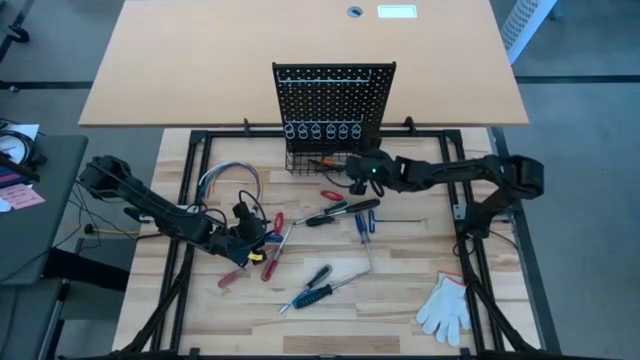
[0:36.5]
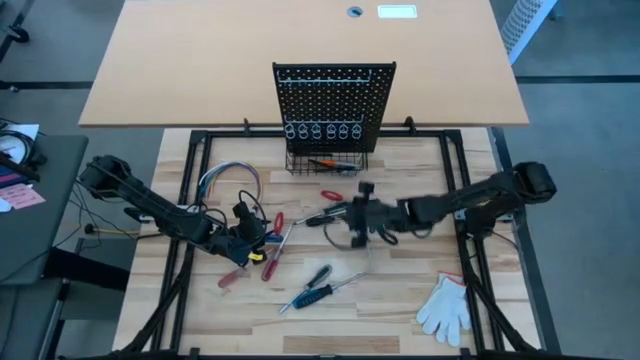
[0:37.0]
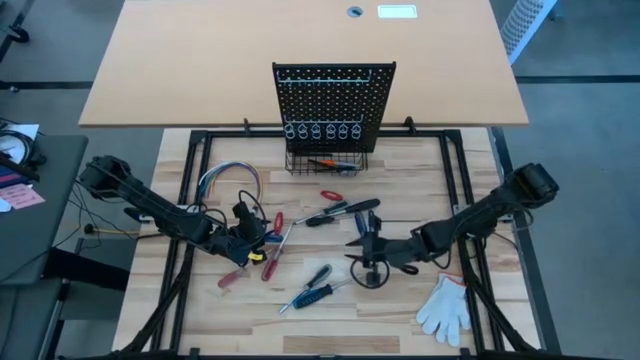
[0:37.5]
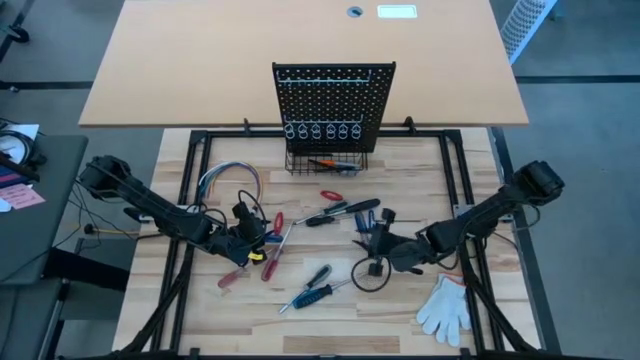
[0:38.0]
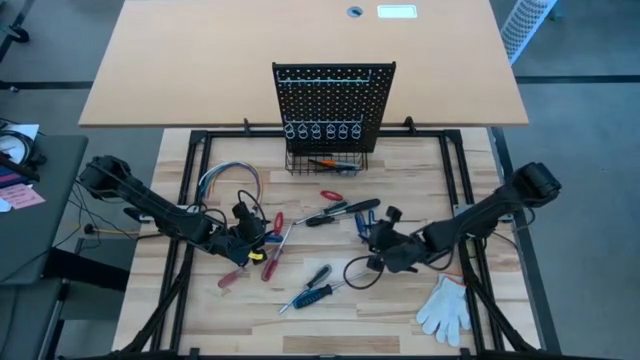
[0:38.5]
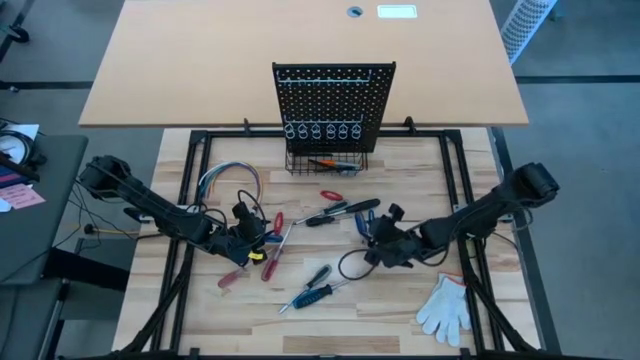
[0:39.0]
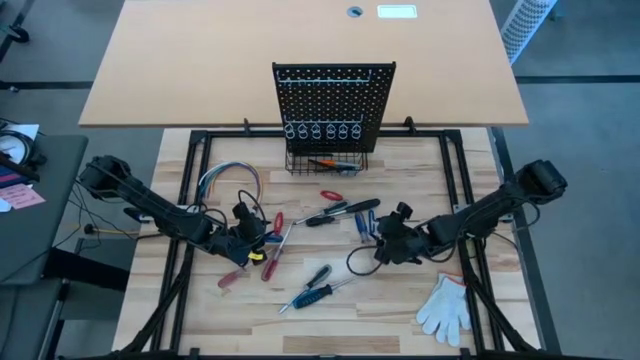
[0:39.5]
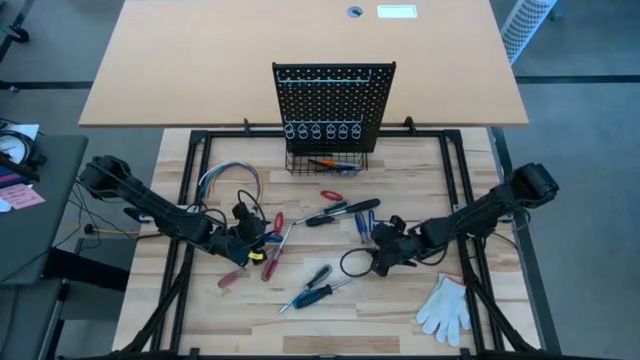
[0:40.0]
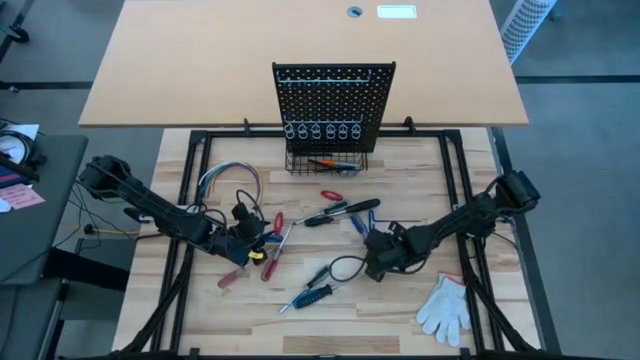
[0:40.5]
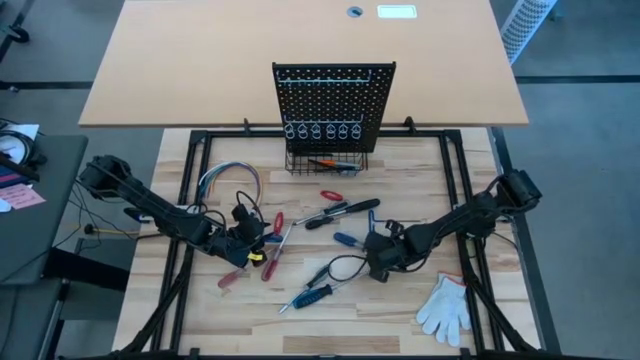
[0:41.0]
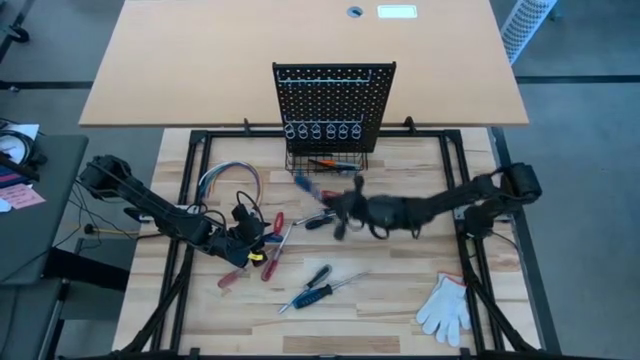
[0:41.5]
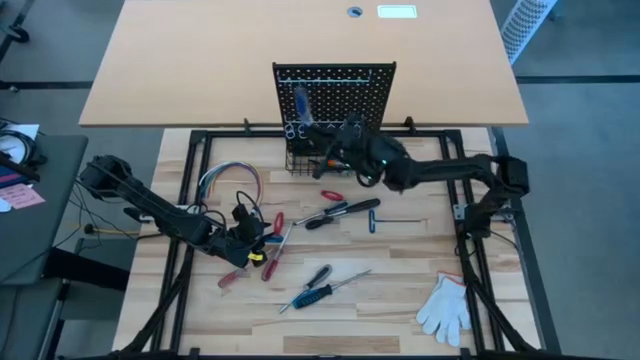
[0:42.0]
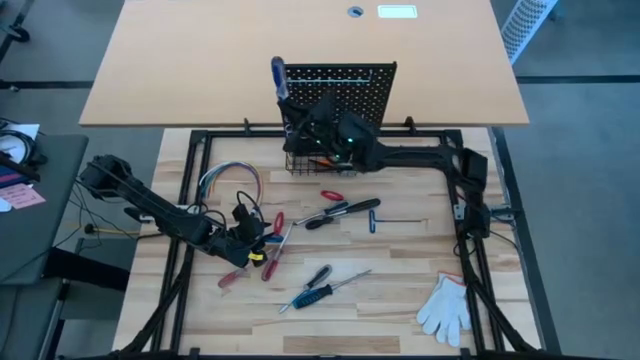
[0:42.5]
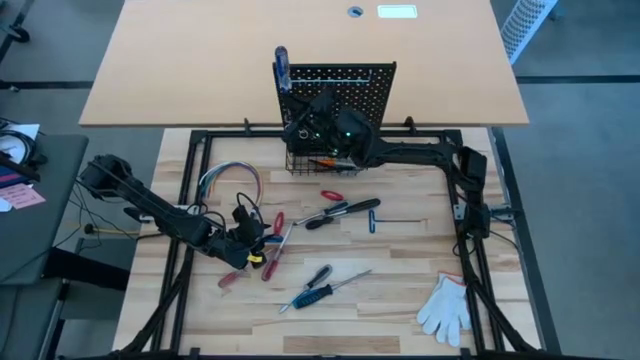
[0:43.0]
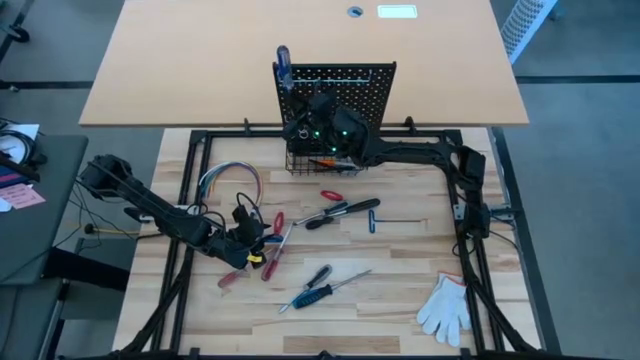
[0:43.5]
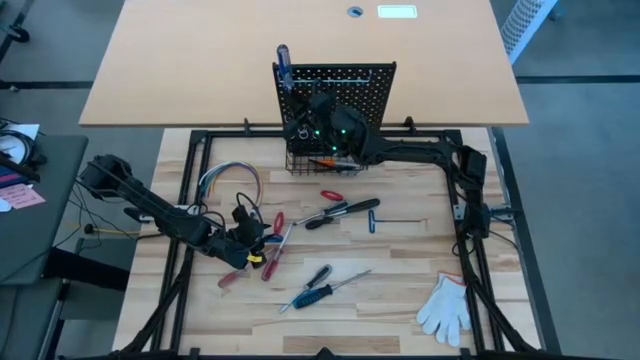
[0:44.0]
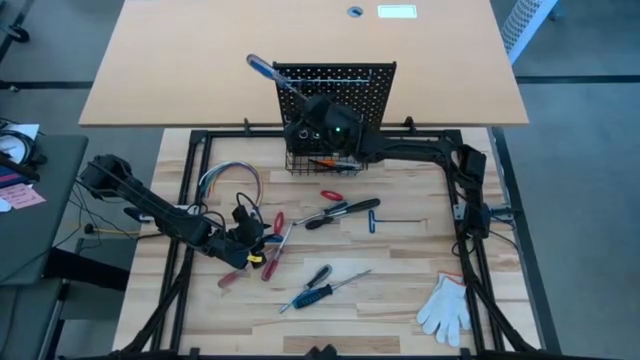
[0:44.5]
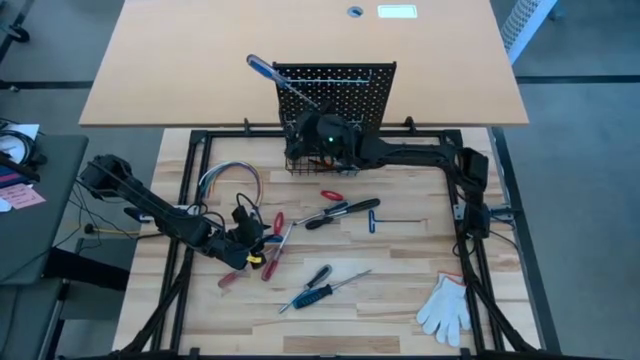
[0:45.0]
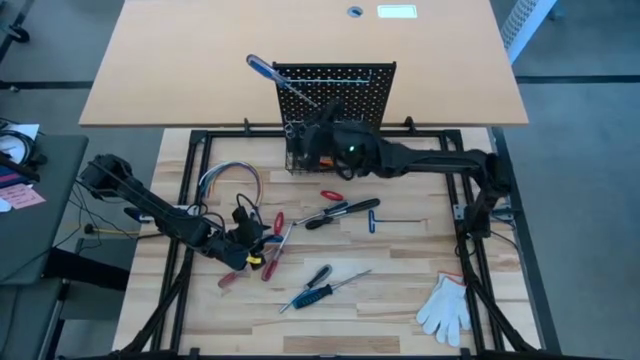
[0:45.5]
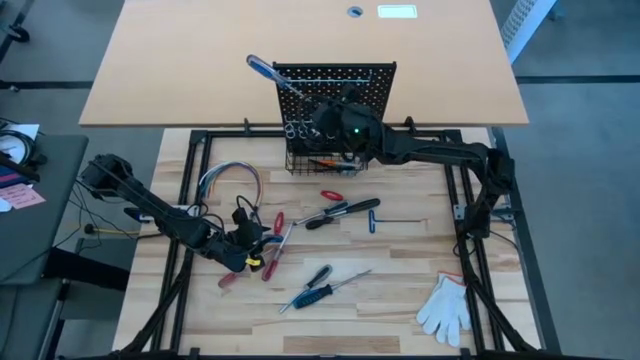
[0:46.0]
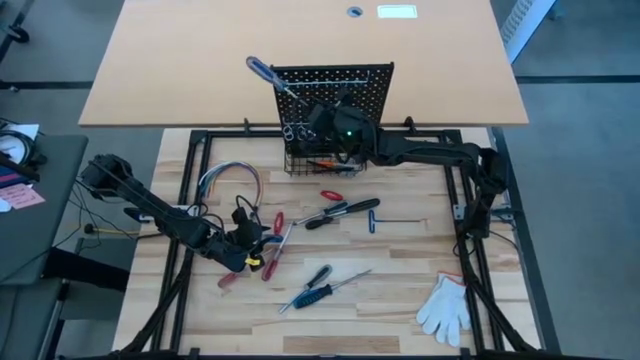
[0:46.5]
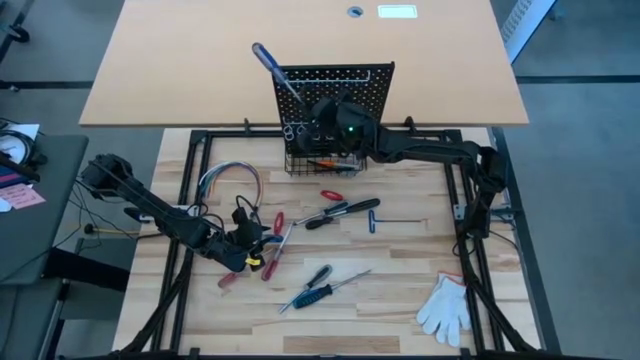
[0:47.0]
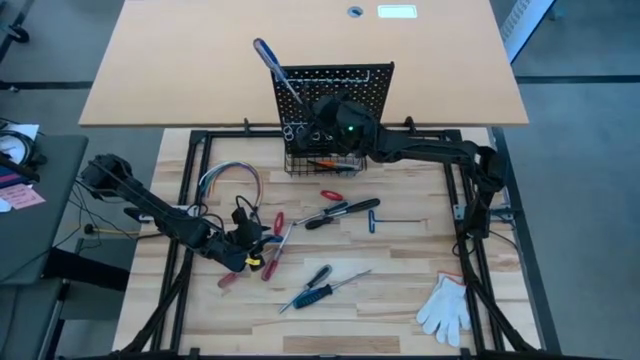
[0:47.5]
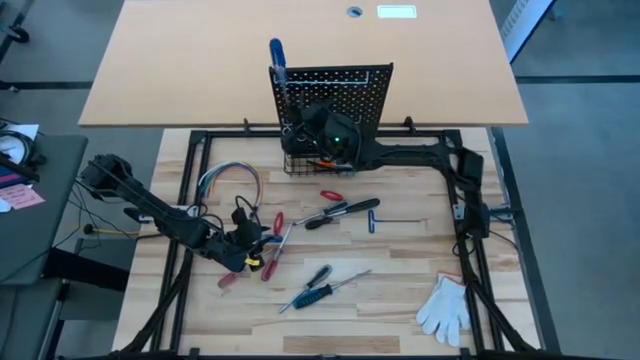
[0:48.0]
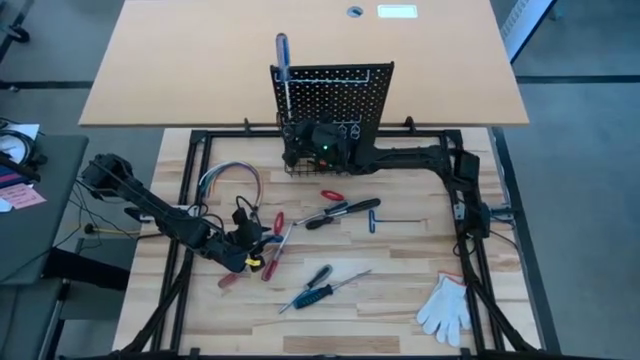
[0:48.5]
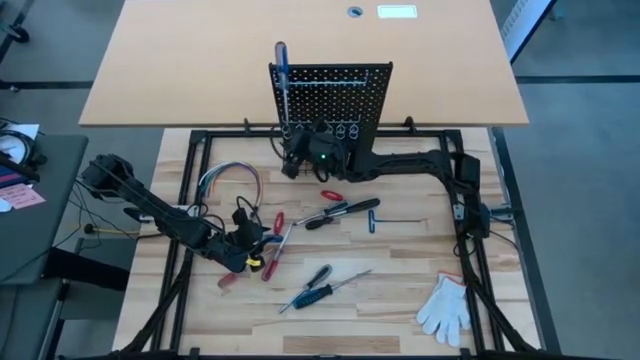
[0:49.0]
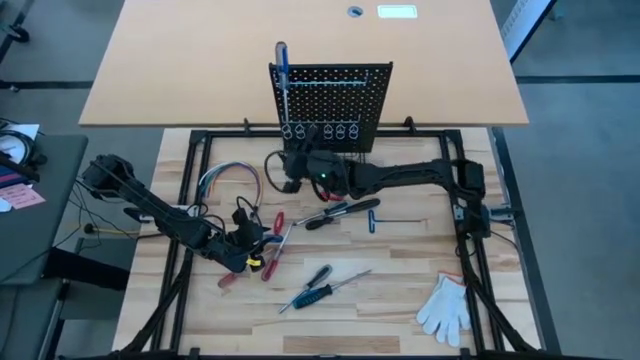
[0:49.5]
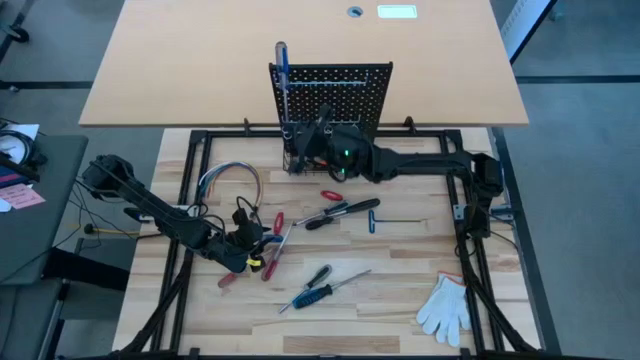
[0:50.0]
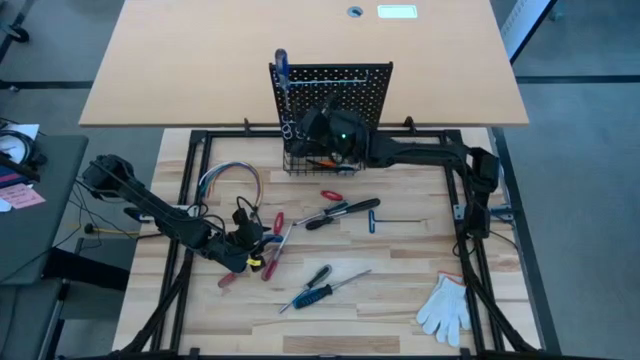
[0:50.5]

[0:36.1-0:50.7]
Task: Hang tools onto peg board
Hang the right blue screwdriver on the pegboard

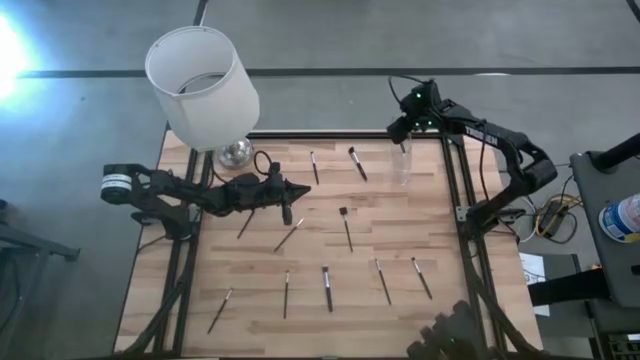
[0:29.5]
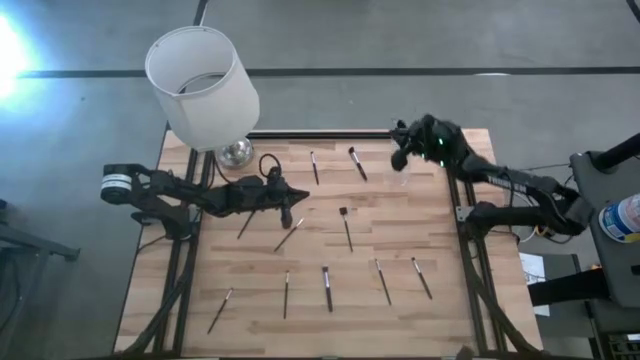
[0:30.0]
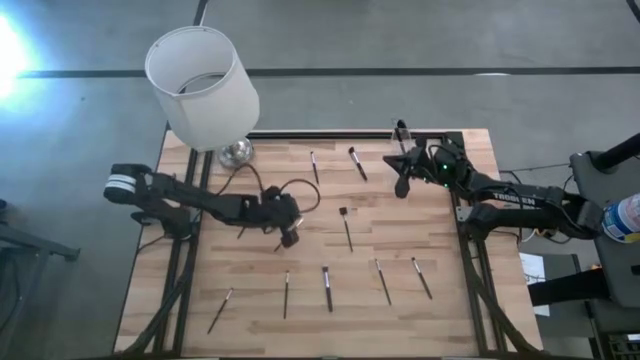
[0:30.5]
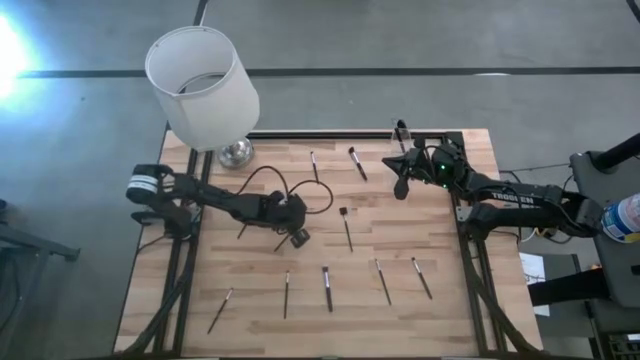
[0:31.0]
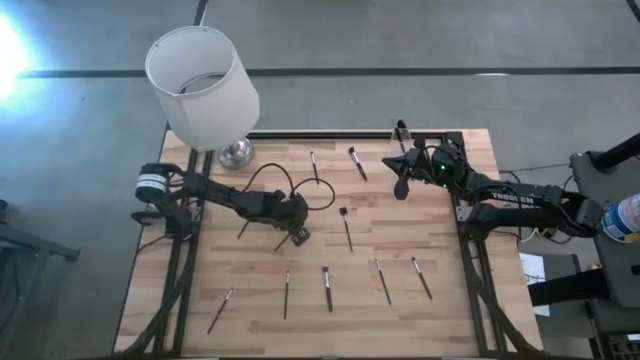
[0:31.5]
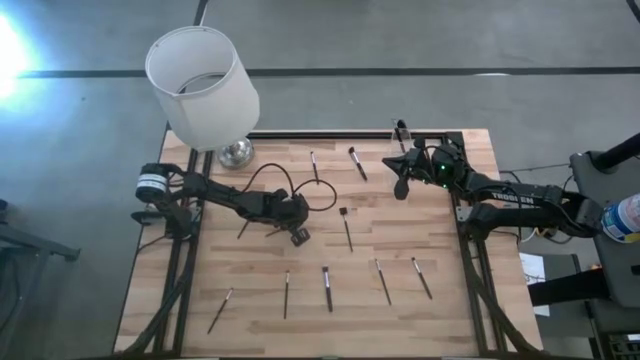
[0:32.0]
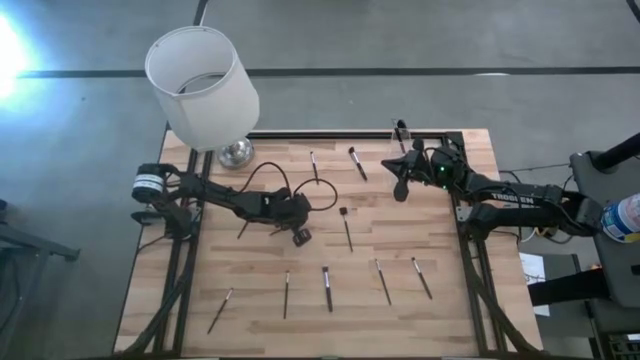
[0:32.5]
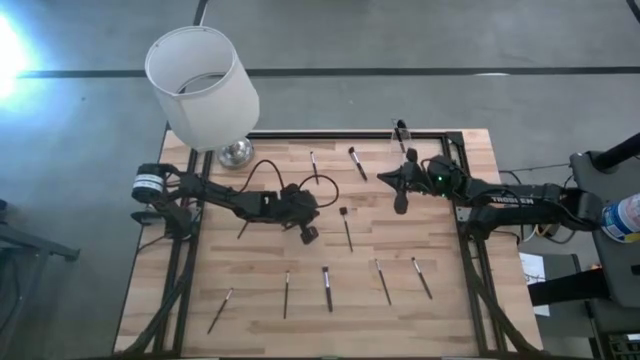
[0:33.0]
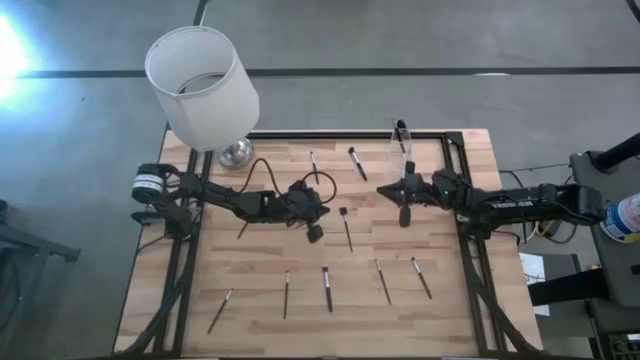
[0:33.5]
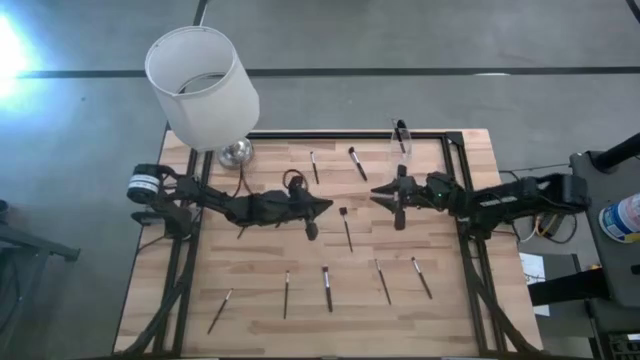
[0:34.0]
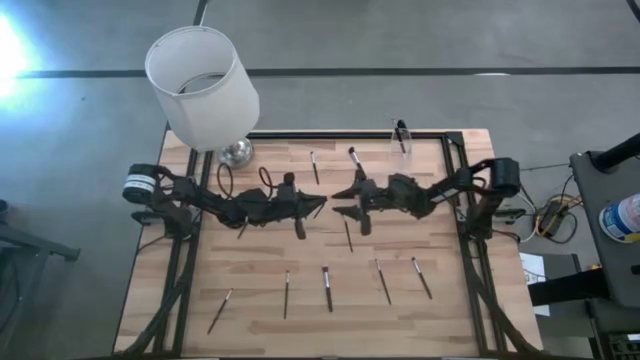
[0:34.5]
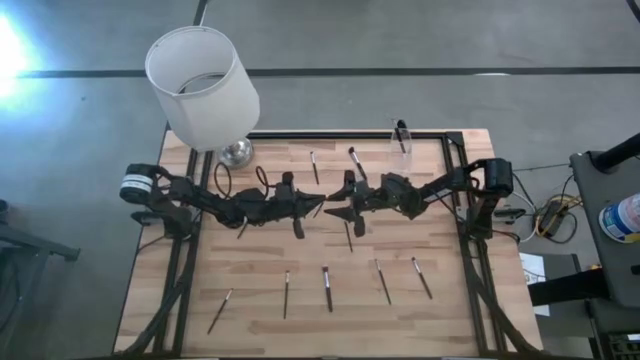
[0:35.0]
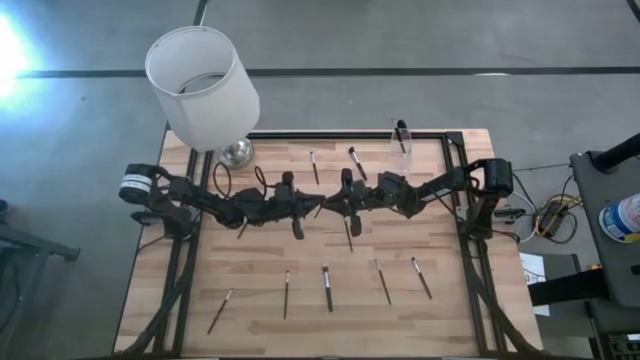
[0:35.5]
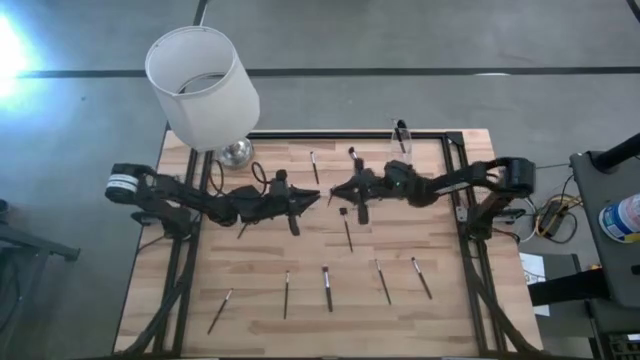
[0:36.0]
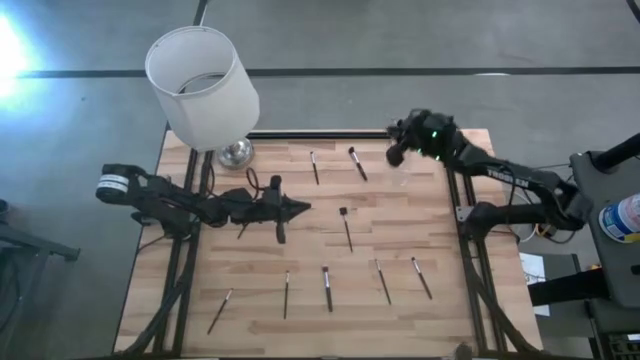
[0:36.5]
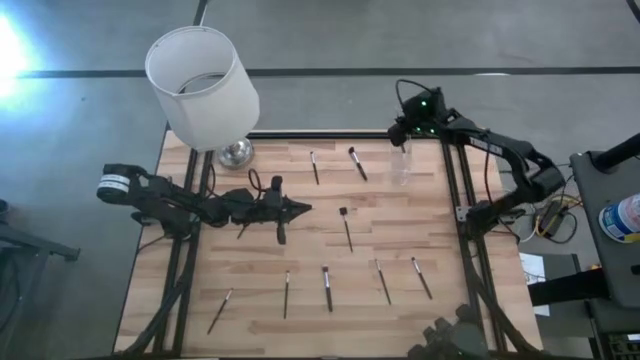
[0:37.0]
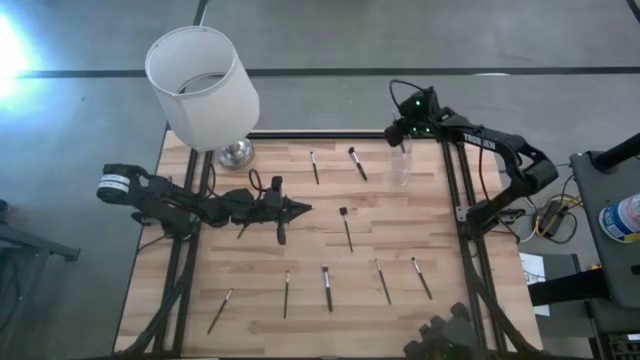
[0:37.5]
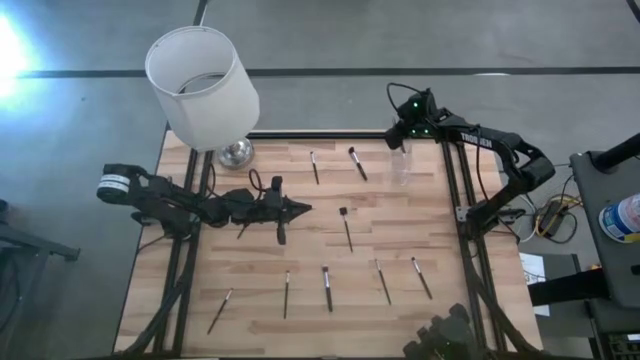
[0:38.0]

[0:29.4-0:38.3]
Task: Put items in baskets/containers
Put the eyeshadow brush into the transparent organizer
